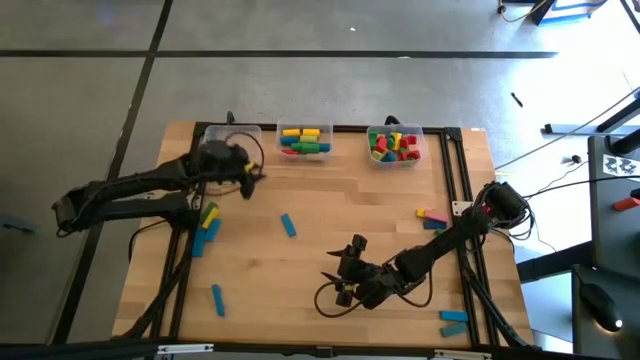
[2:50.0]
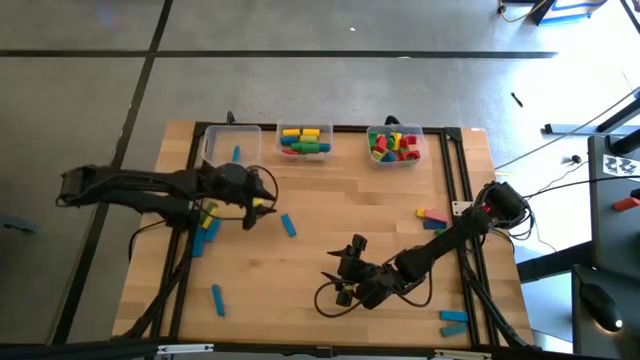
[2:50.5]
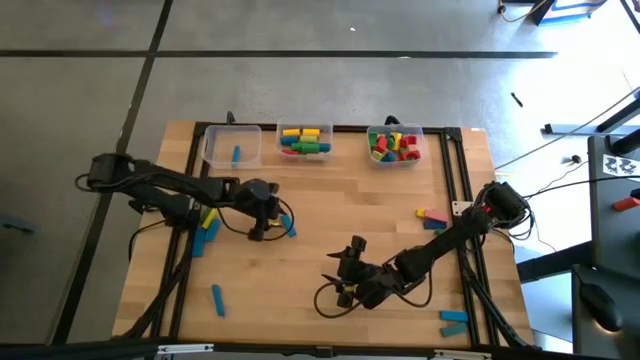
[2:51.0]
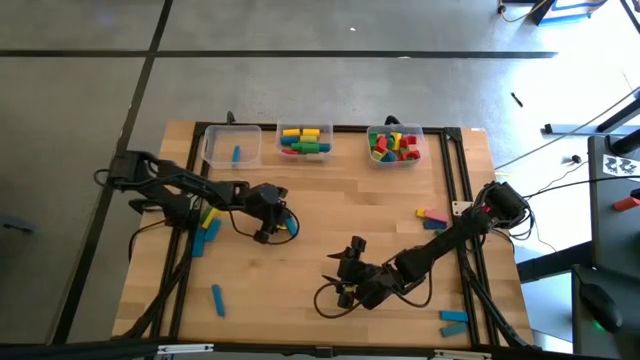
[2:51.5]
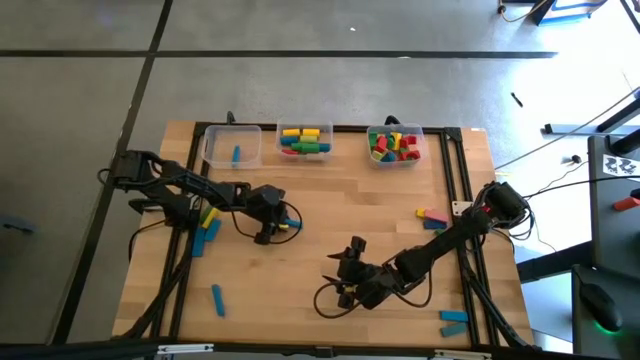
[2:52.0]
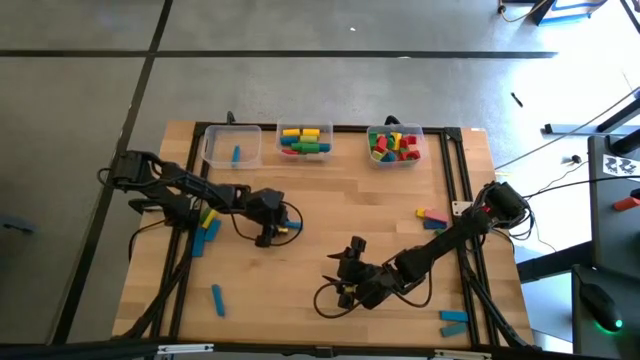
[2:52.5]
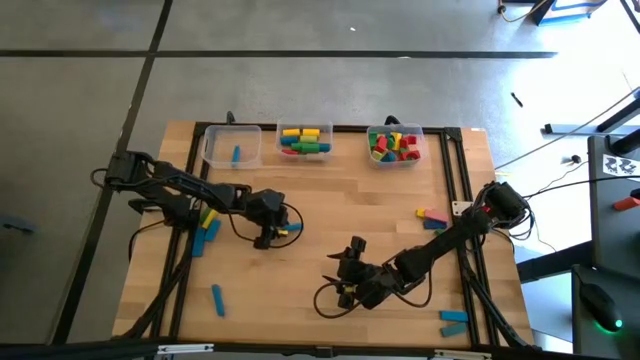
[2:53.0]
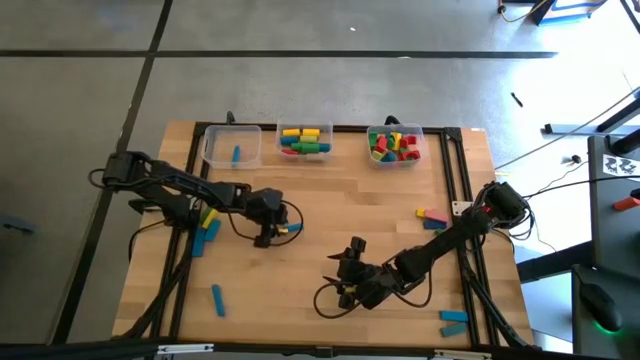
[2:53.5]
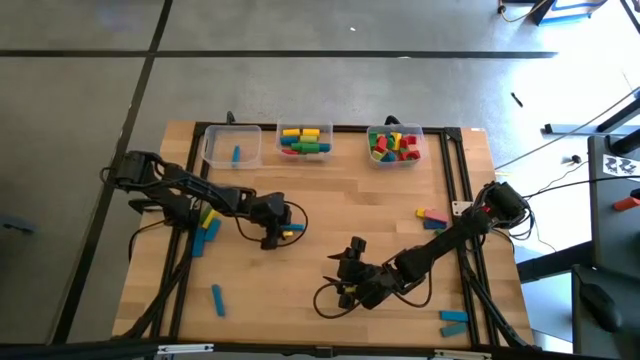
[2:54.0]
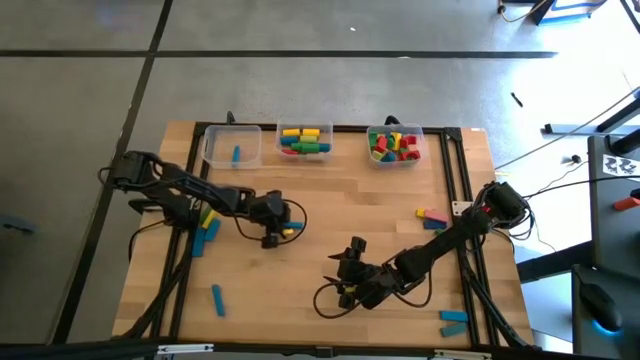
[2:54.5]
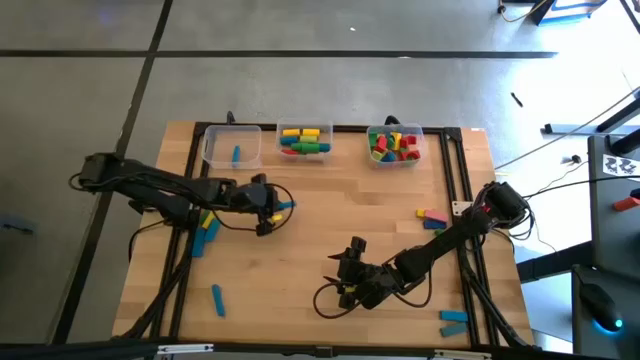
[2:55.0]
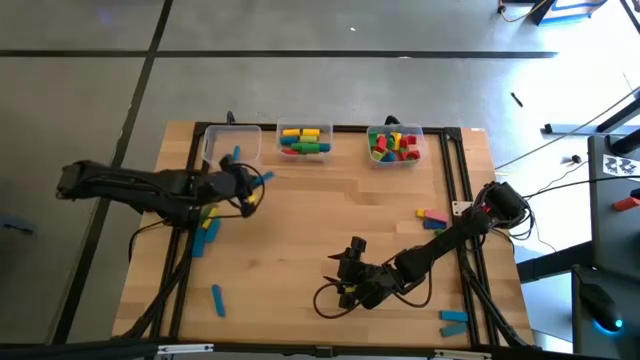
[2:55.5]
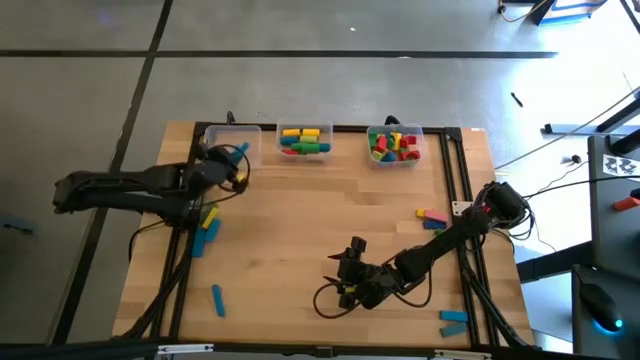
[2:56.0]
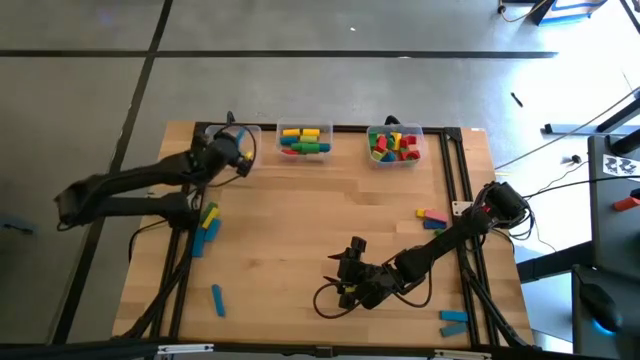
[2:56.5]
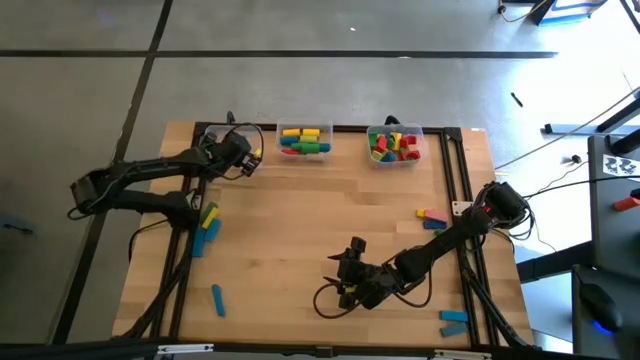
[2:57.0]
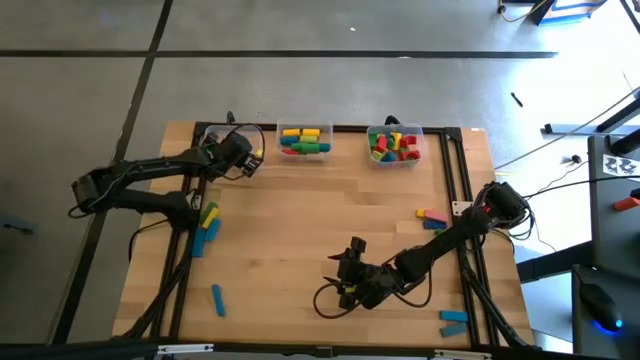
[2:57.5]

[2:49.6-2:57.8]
Task: Sort blocks by size
Put the blue rectangular block into the left transparent bin

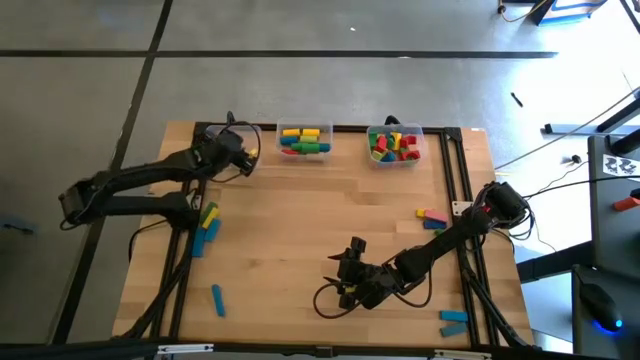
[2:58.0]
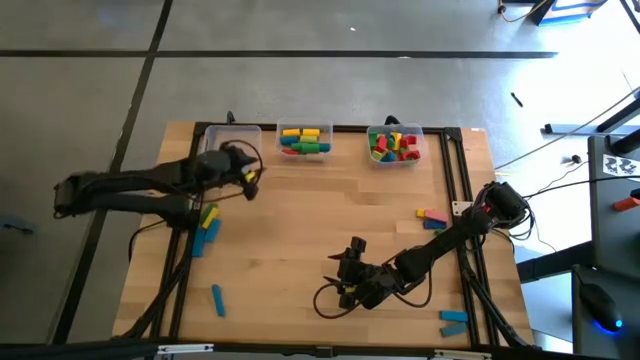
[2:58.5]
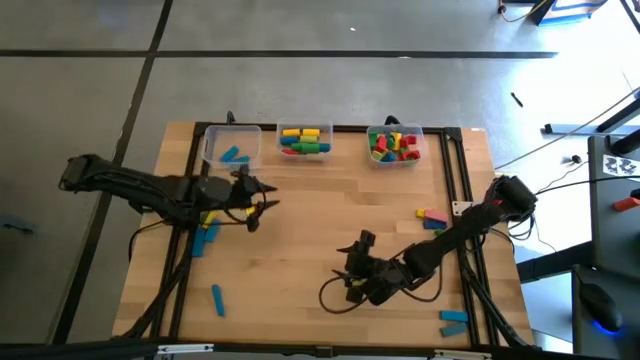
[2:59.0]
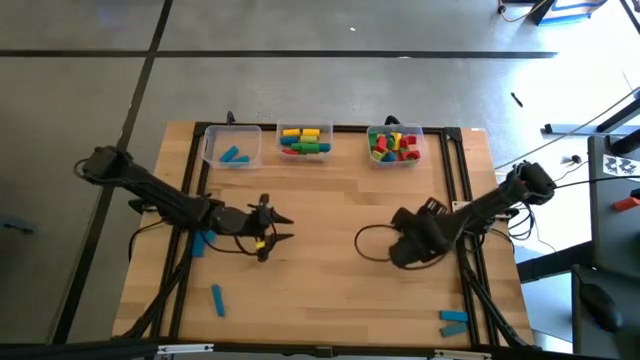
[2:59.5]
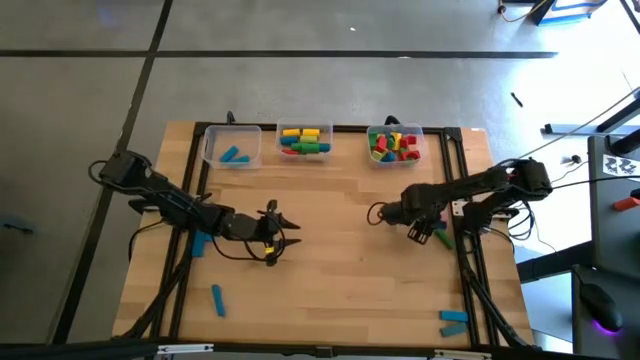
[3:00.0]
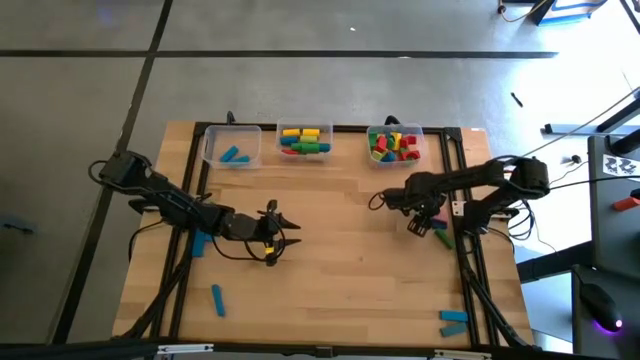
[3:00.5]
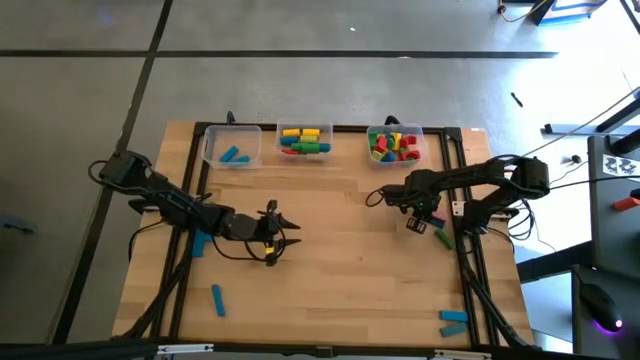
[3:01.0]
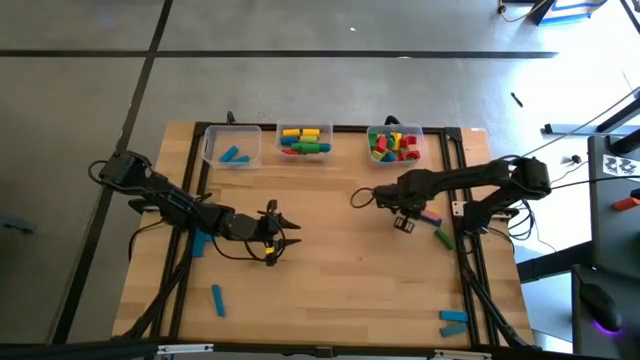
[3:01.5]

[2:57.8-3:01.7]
Put the pink rectangular block into the left transparent bin

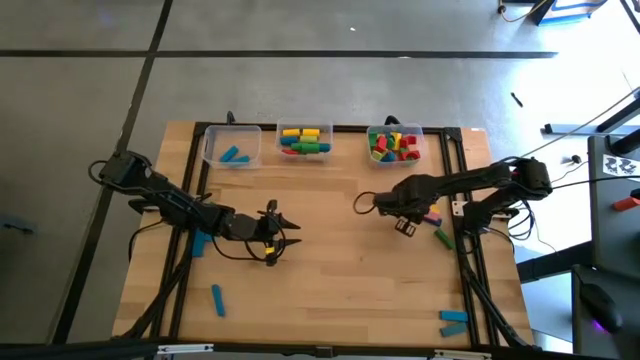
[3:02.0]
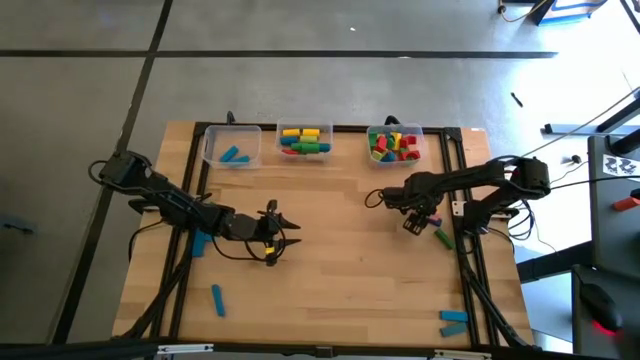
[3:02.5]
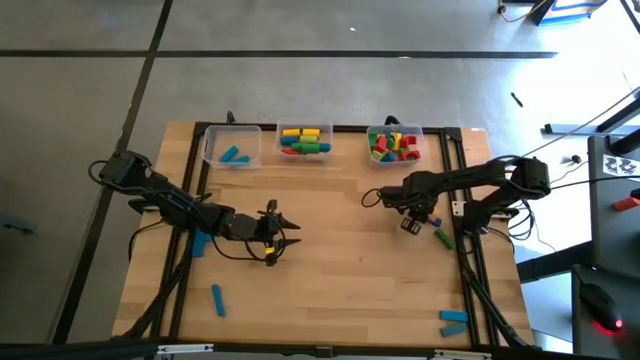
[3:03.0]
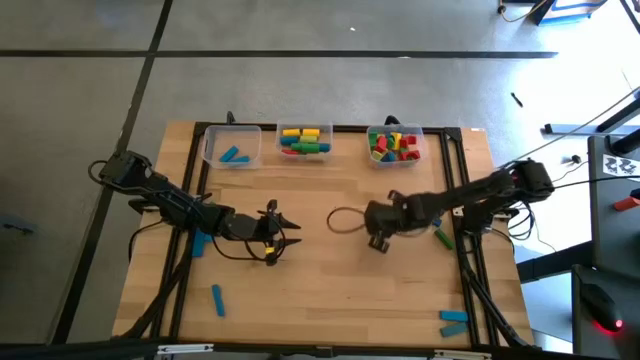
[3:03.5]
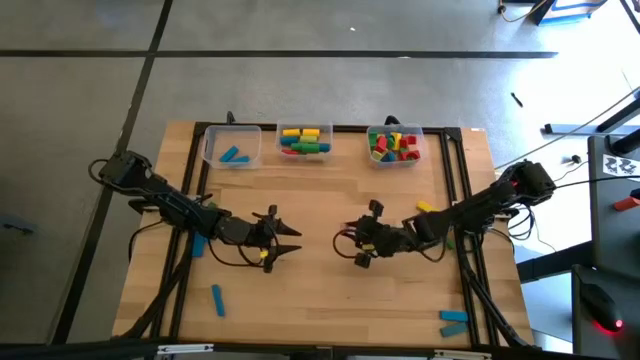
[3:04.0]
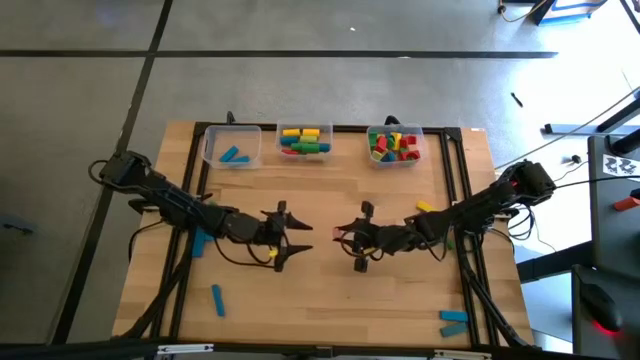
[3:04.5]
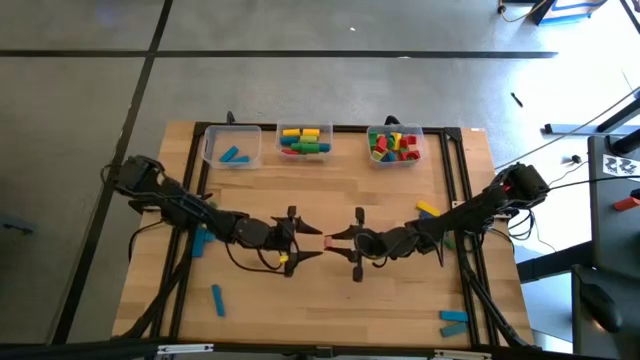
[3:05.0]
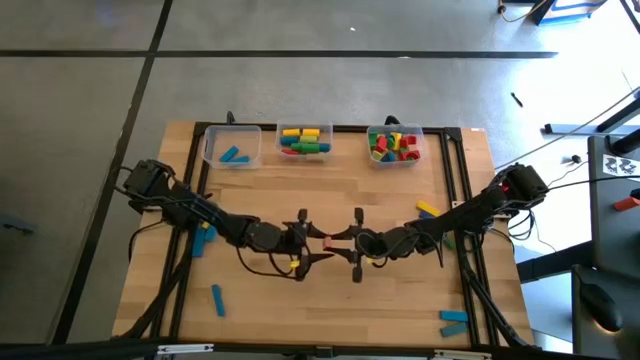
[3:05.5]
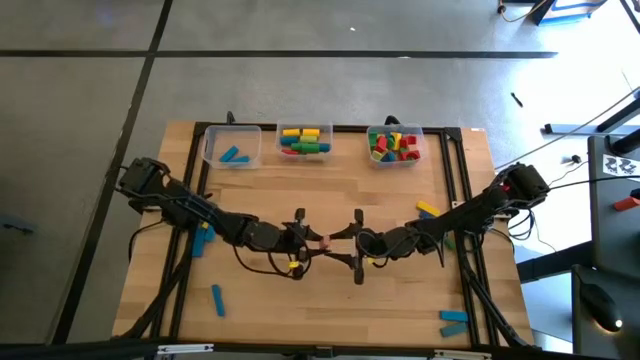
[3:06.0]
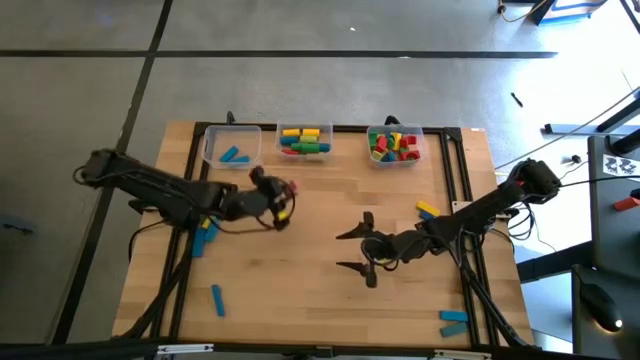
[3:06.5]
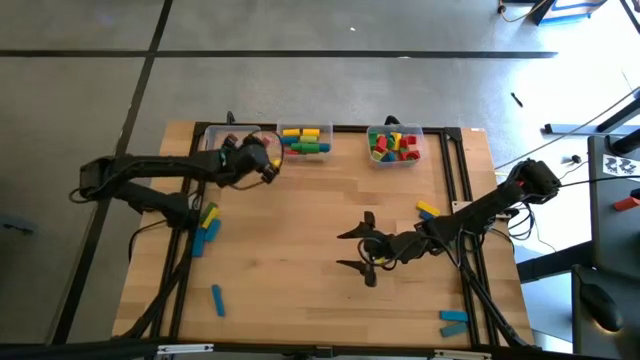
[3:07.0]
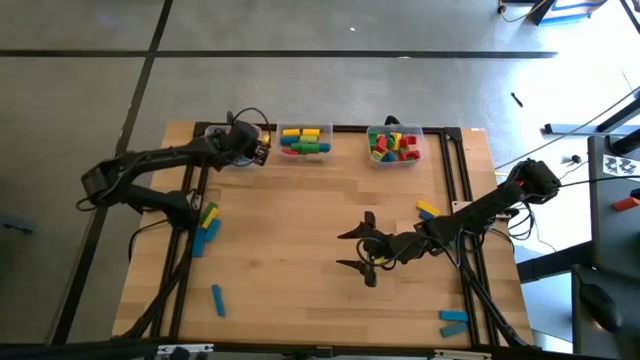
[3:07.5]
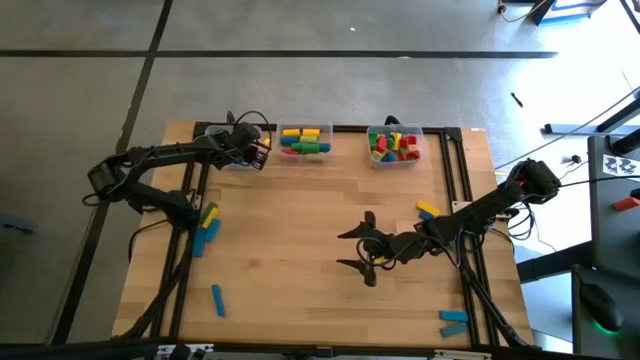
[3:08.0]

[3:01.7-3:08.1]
Put the pink rectangular block into the left transparent bin

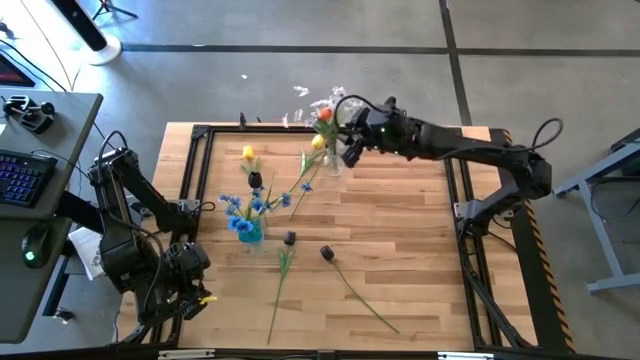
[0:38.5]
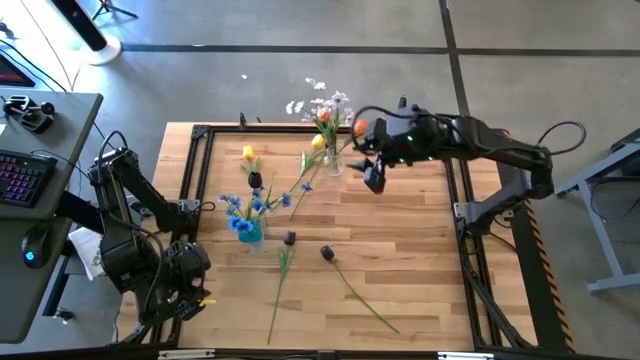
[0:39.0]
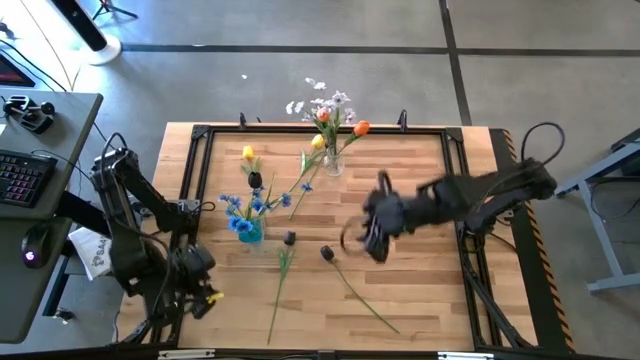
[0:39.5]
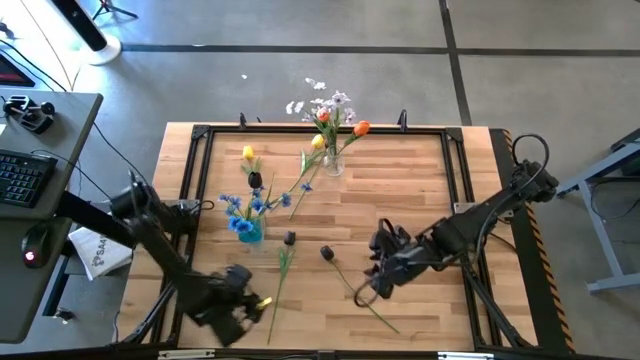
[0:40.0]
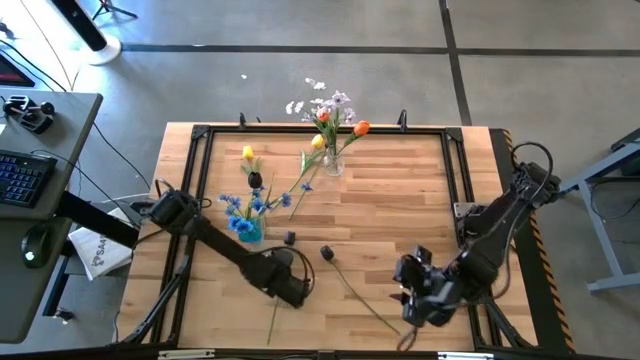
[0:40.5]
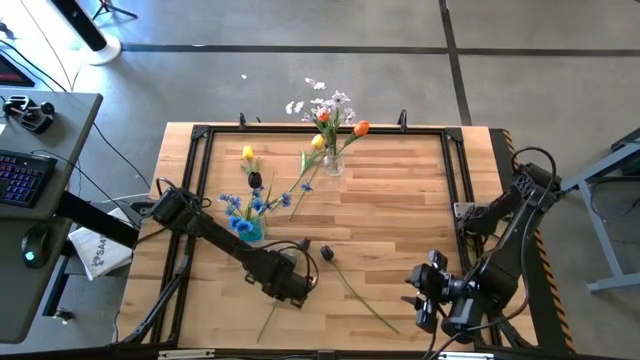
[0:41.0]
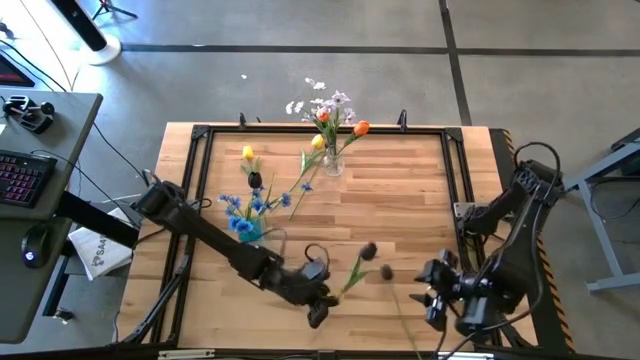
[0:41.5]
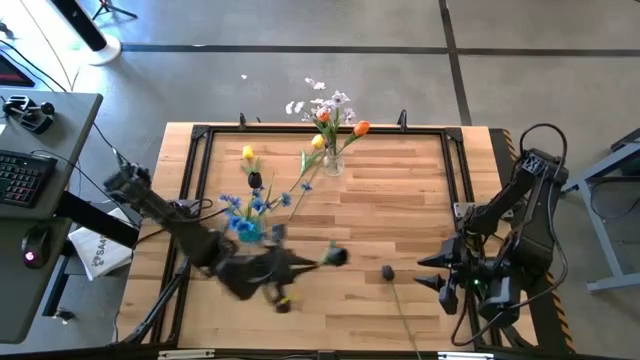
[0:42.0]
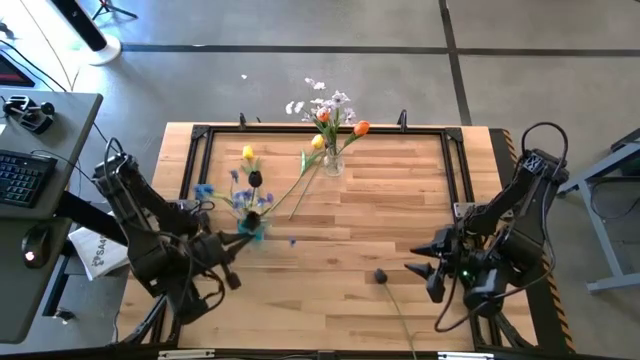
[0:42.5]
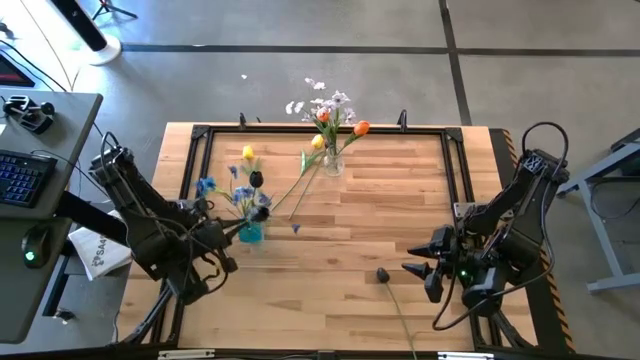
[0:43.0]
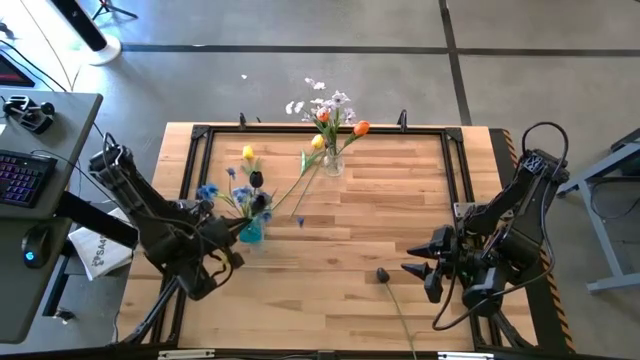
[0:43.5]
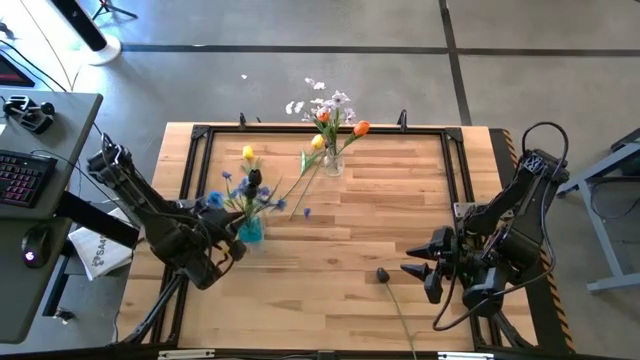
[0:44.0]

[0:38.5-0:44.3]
Task: Sort flowers into vase by color
Put the left black flower into the blue vase
